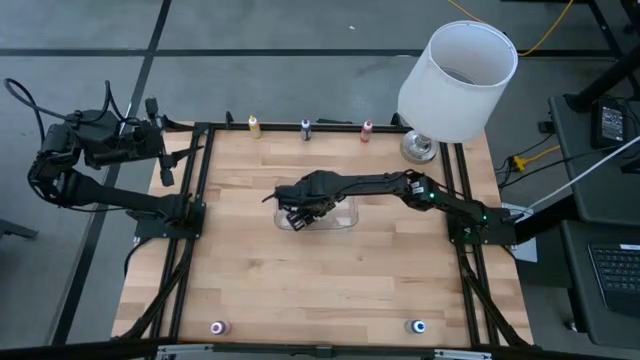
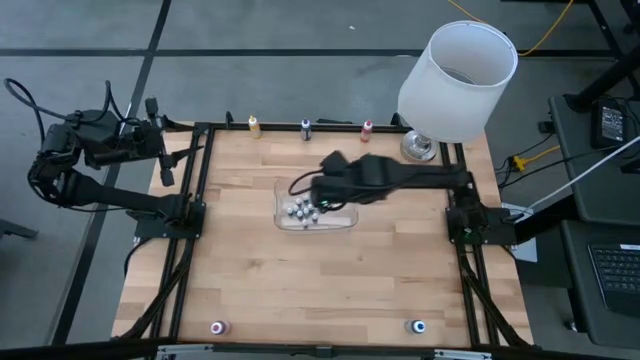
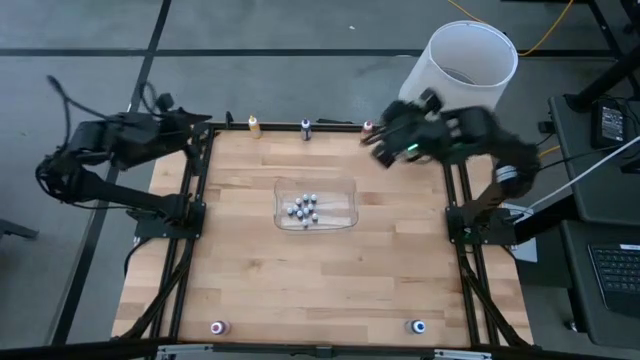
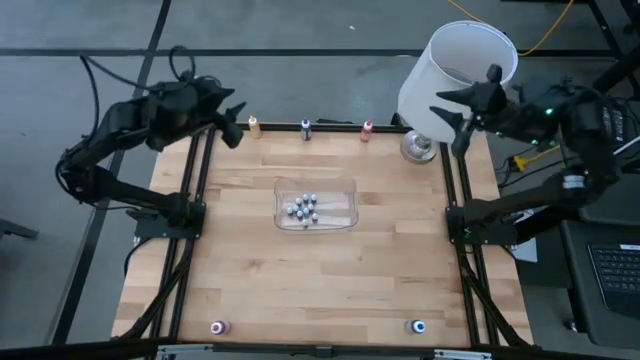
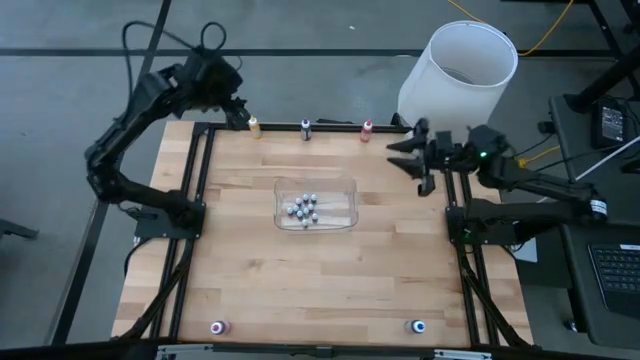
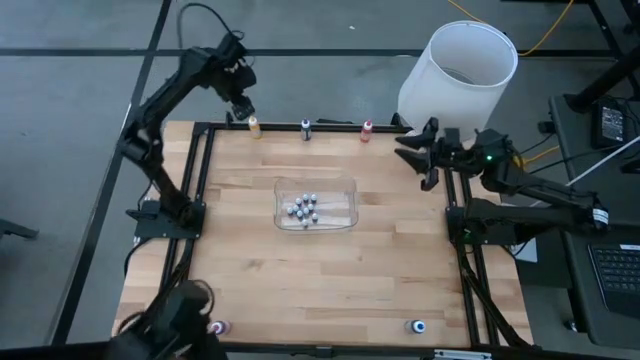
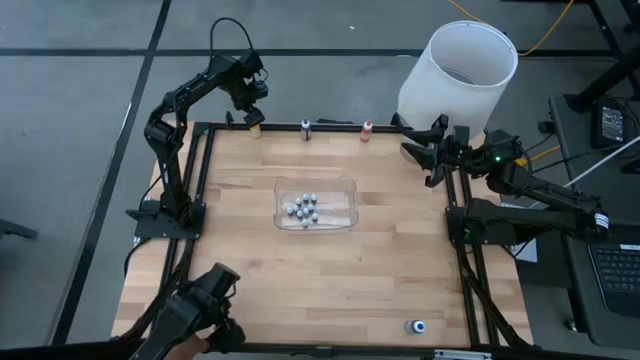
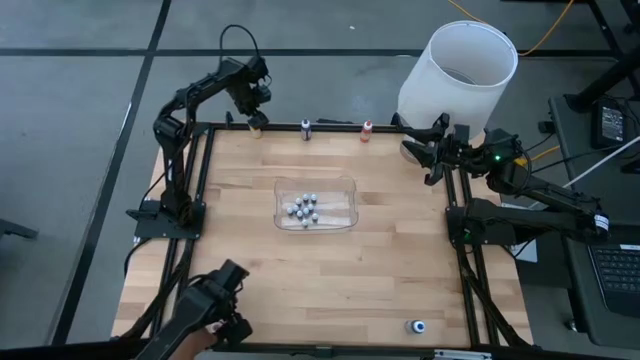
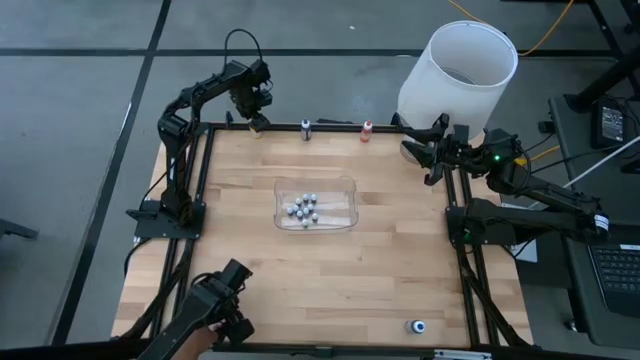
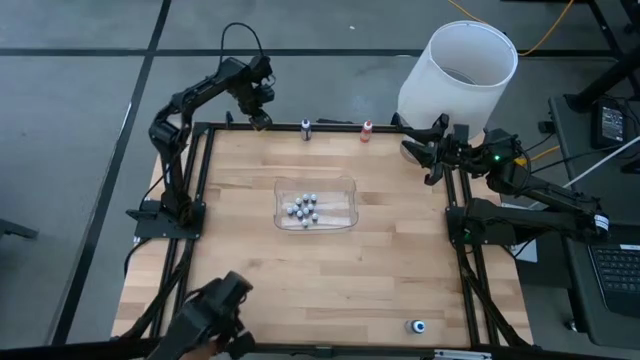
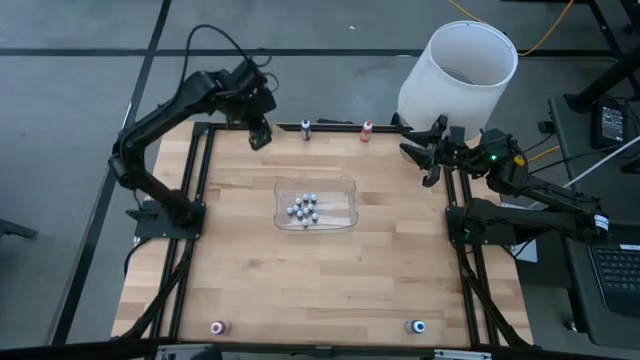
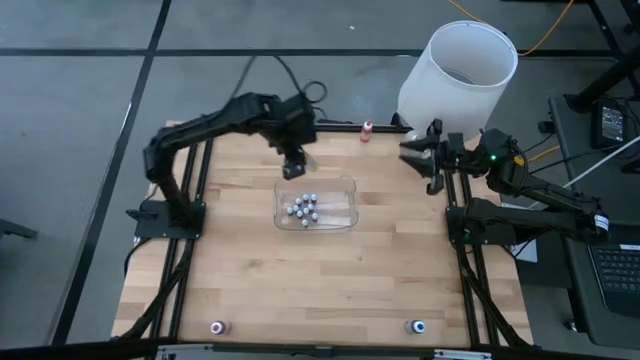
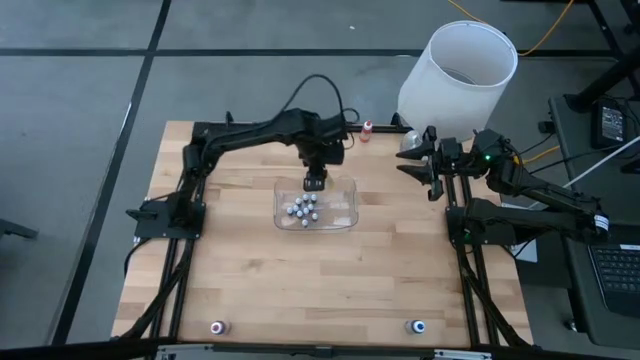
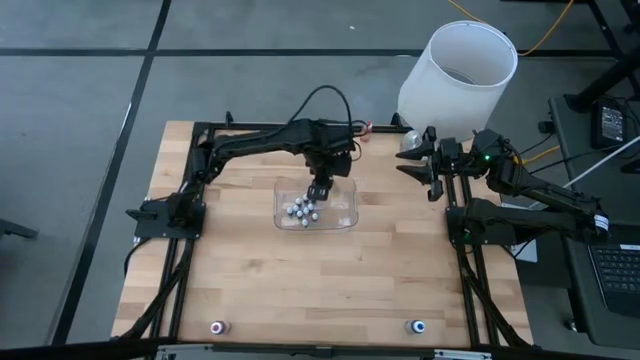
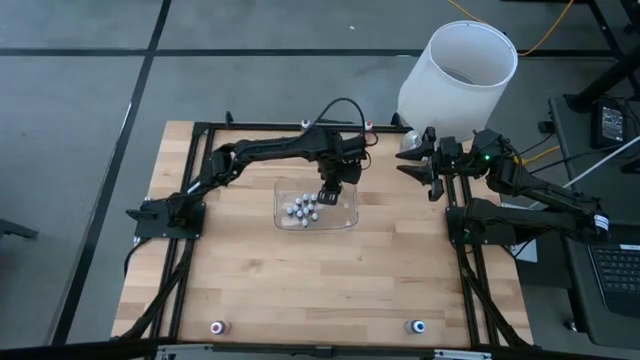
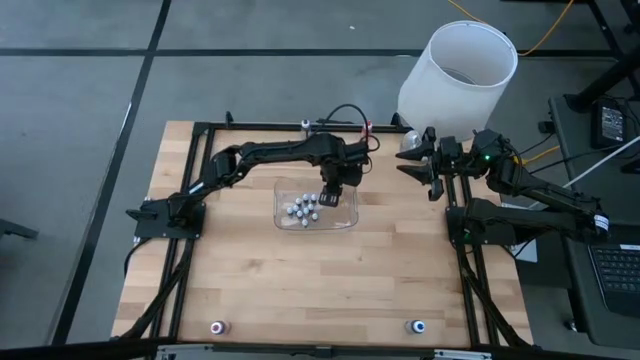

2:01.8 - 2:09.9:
Task: Pick & Place food coloring
Put the large yellow food coloring bottle into the transparent bin

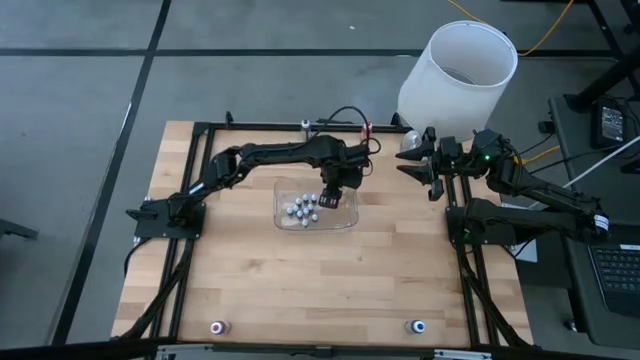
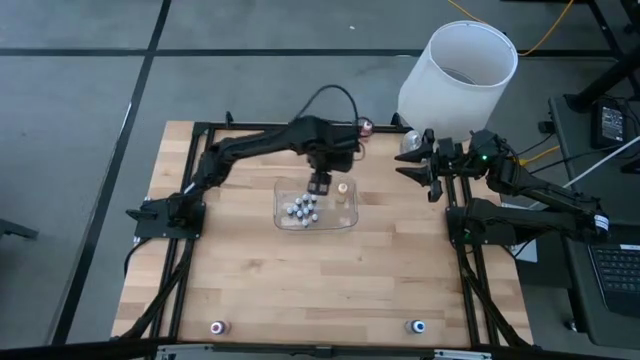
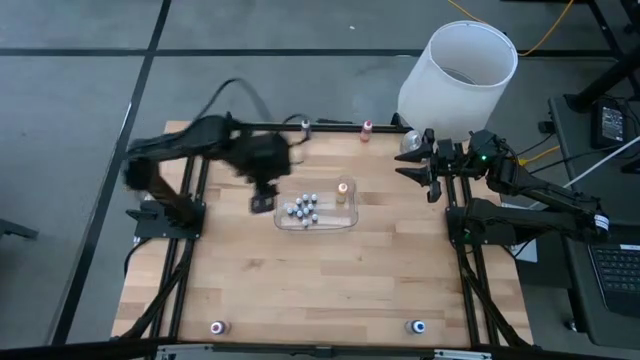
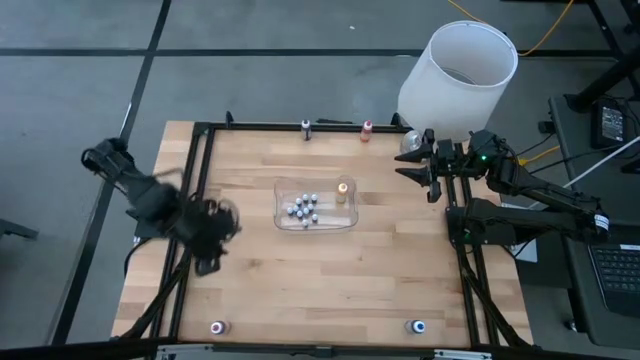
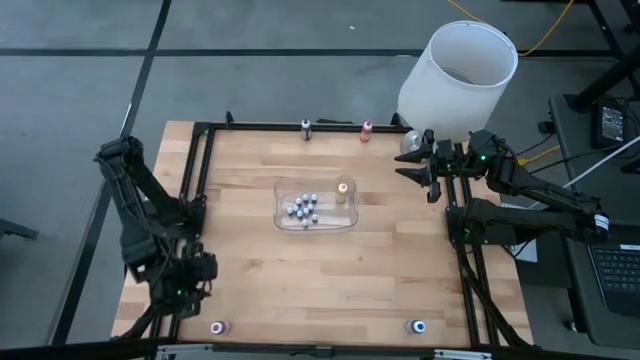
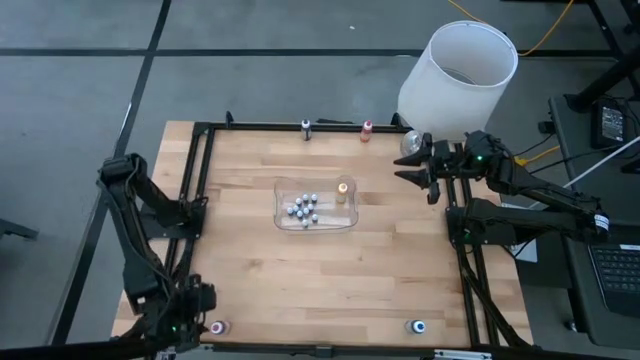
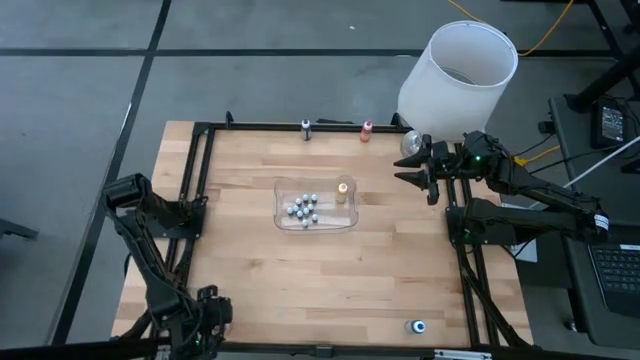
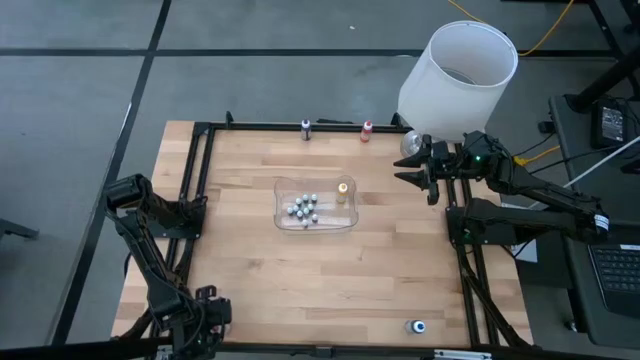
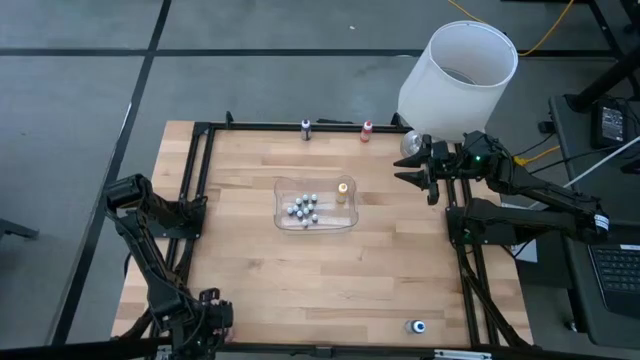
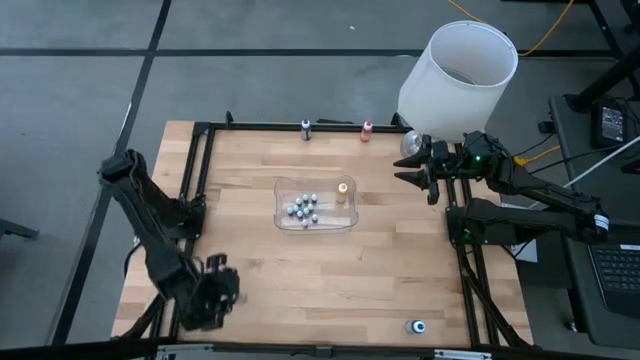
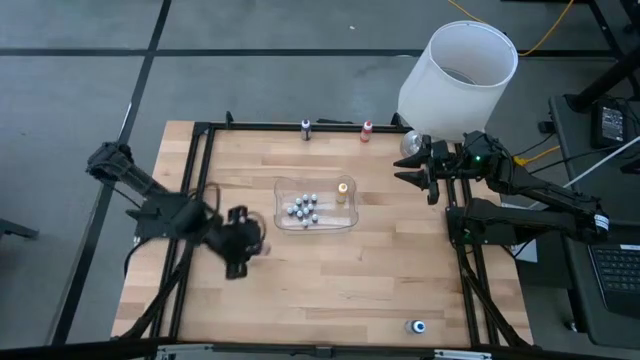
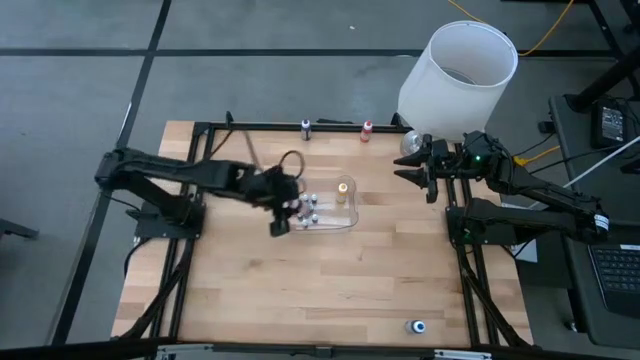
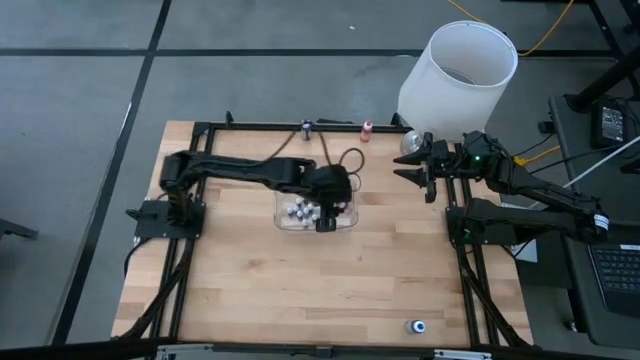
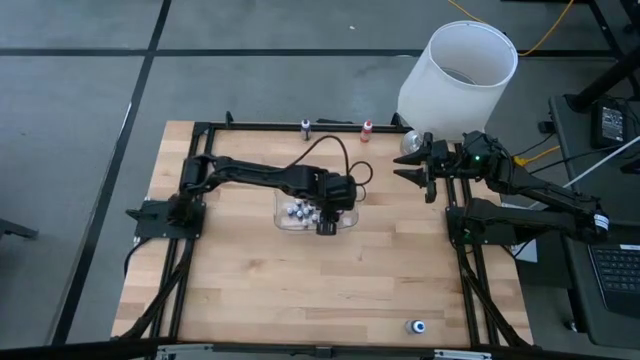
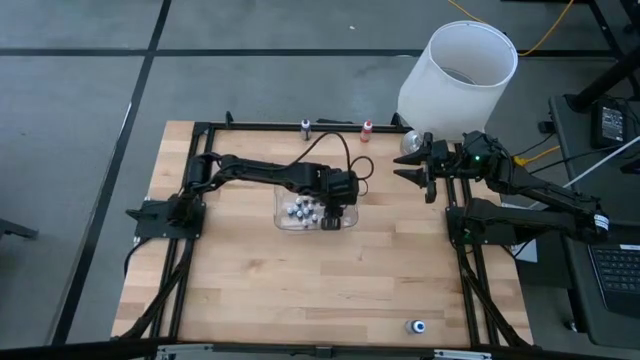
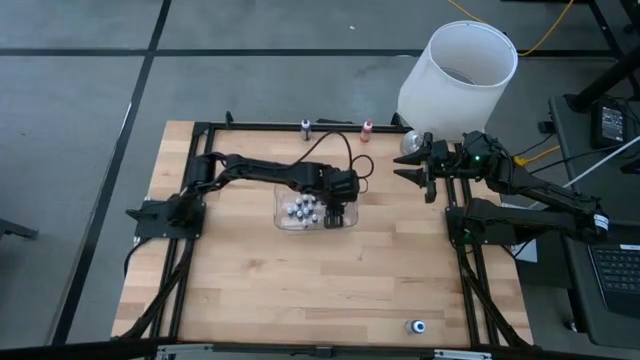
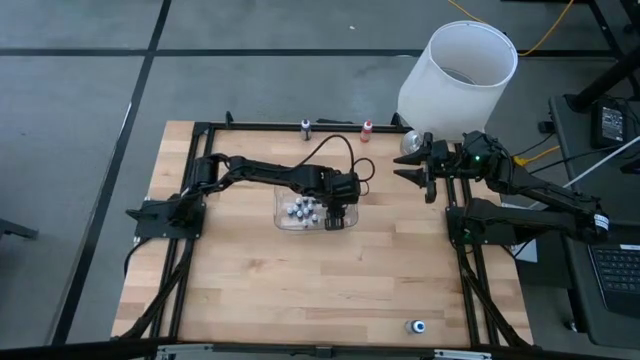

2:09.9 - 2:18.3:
Put the large pink food coloring bottle into the transparent bin

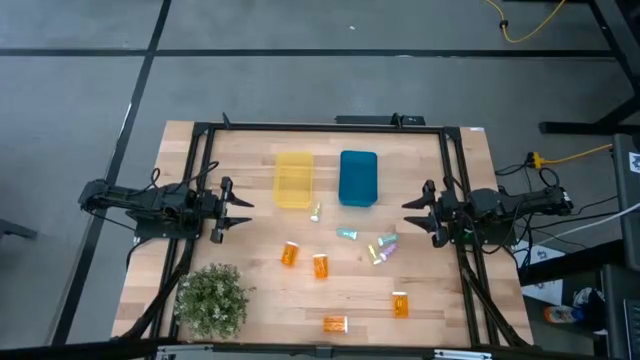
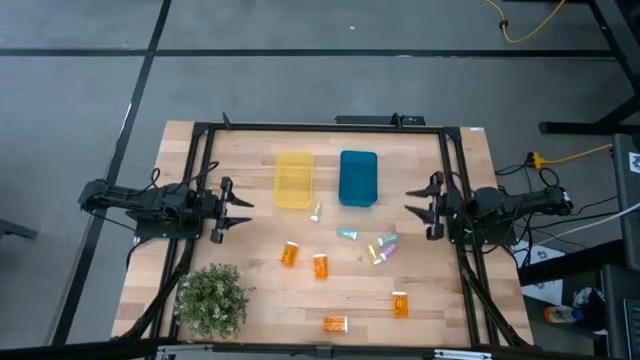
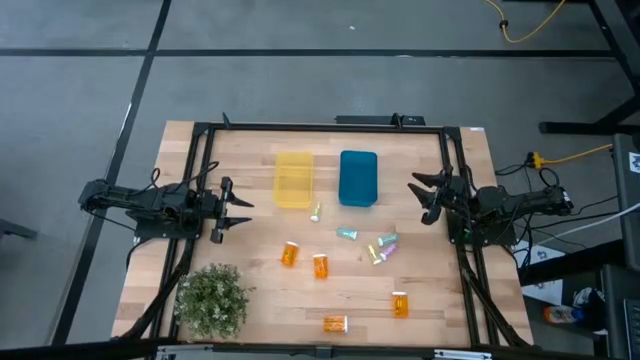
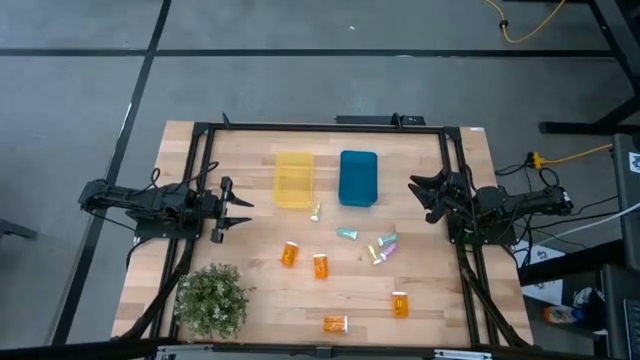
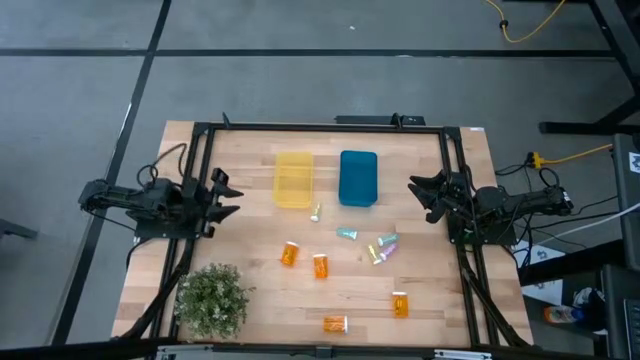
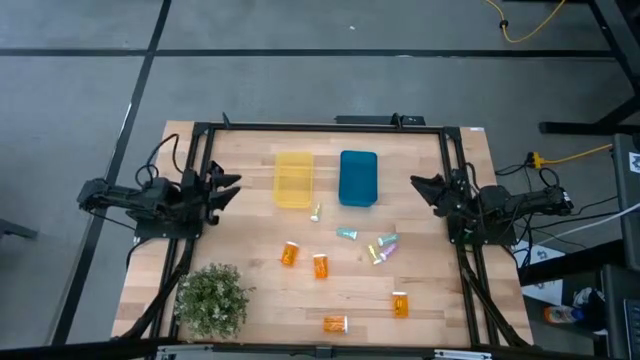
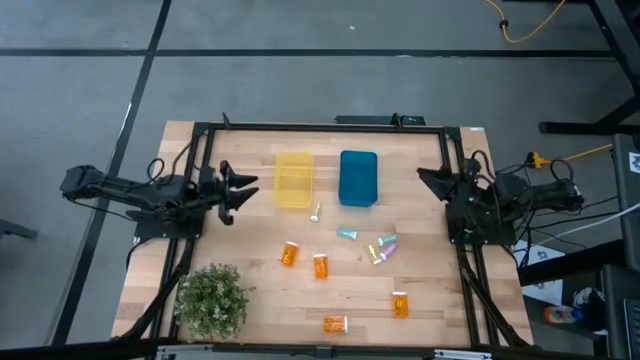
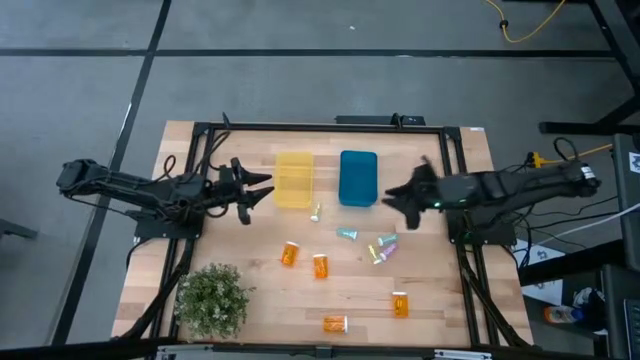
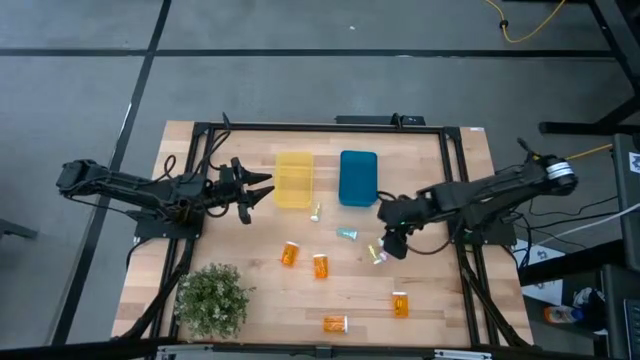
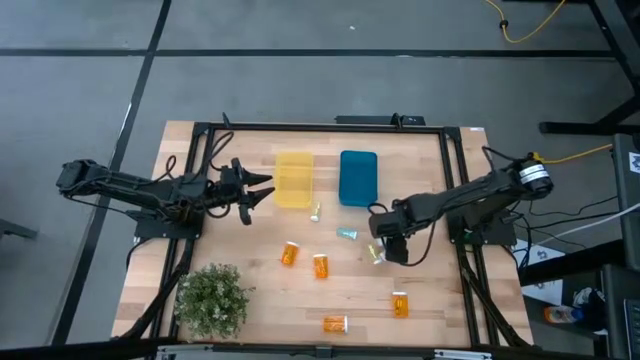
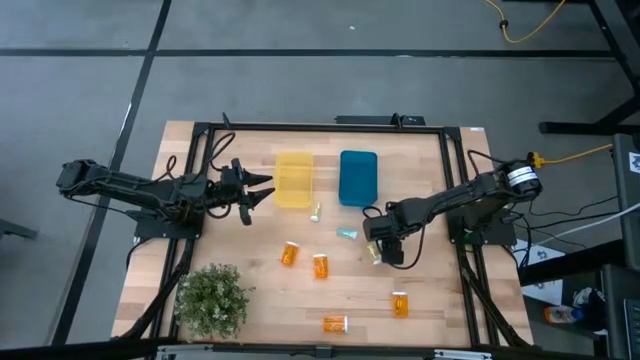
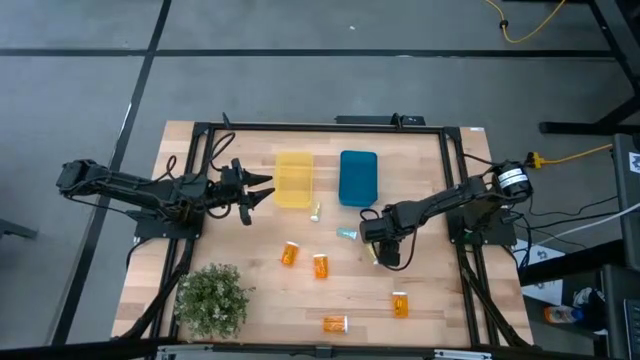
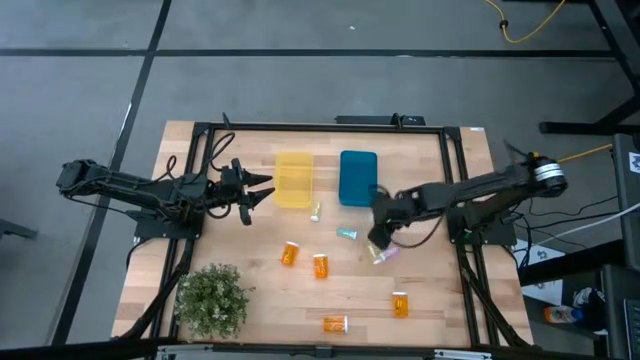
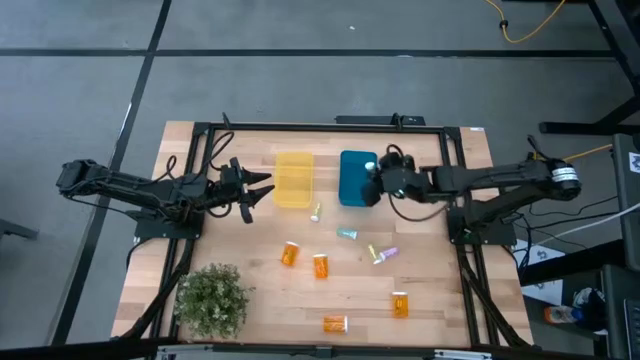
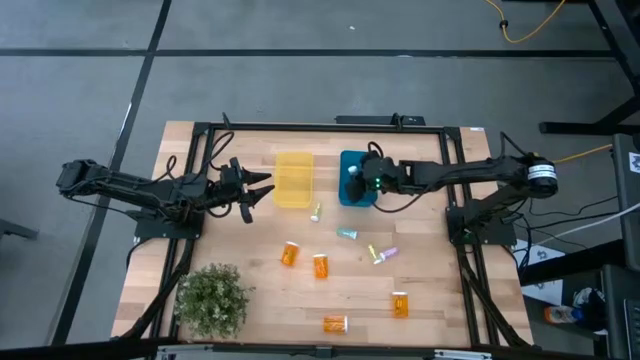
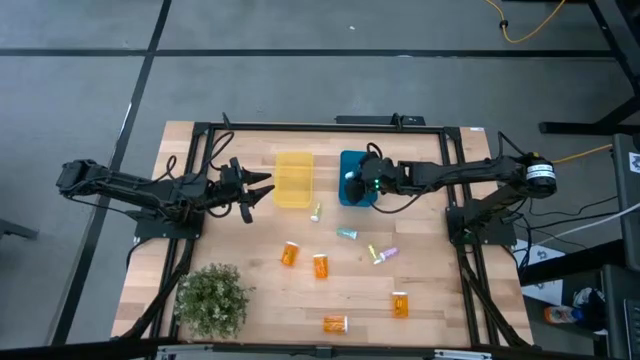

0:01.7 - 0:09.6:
Task: Pick and place medicine bottles into bin by pill shape (circle, oval)
Put the right blue pill bottle into the blue bin
